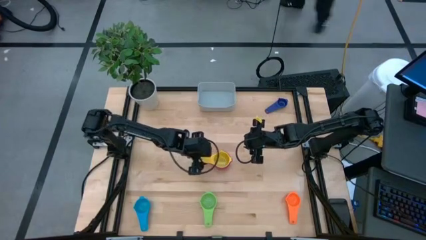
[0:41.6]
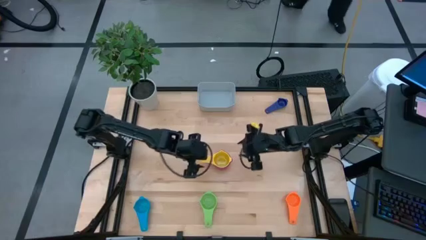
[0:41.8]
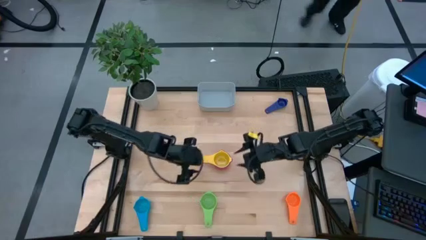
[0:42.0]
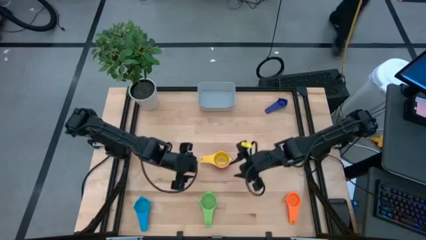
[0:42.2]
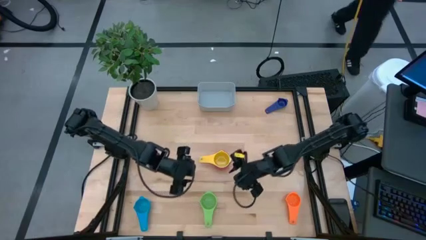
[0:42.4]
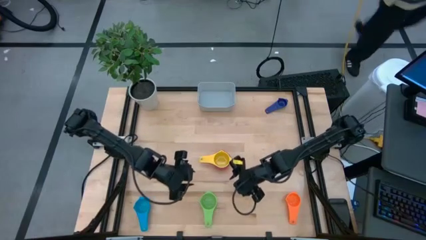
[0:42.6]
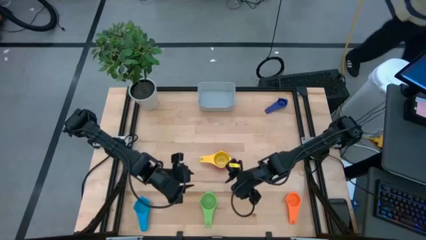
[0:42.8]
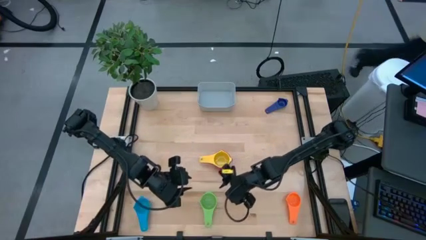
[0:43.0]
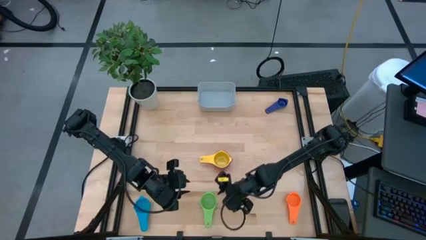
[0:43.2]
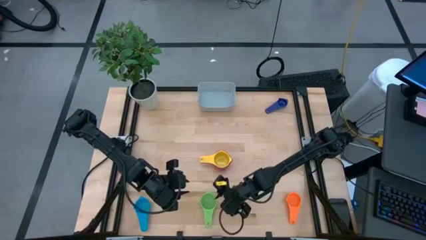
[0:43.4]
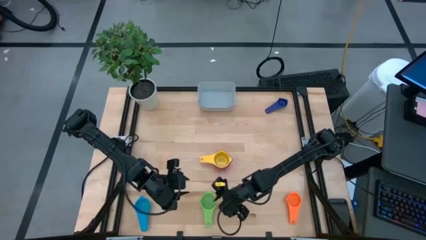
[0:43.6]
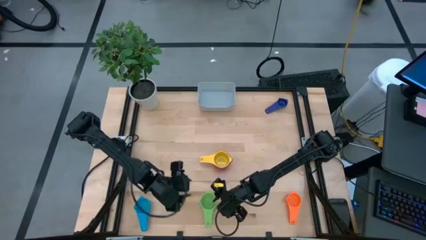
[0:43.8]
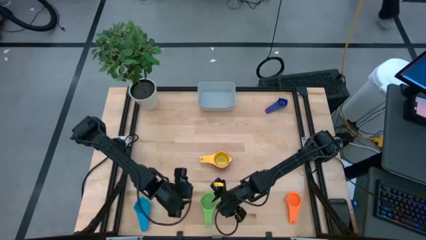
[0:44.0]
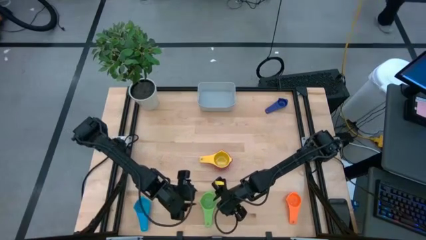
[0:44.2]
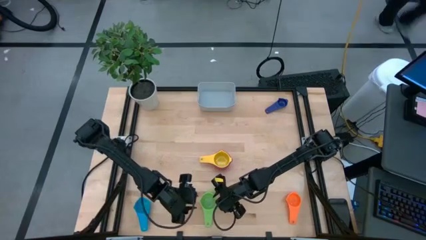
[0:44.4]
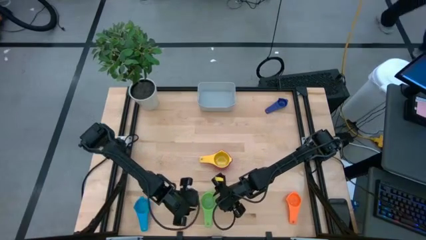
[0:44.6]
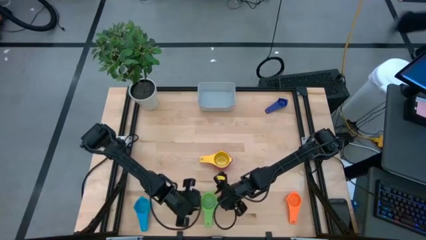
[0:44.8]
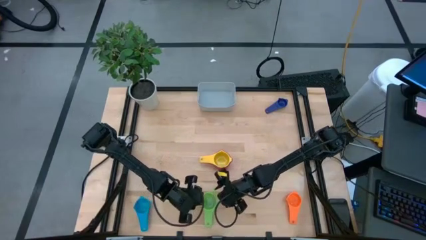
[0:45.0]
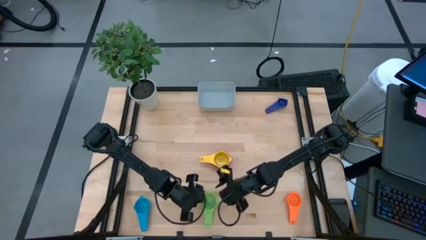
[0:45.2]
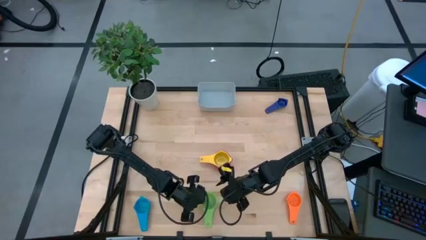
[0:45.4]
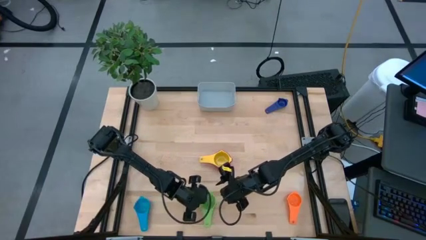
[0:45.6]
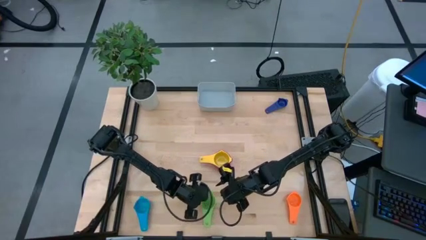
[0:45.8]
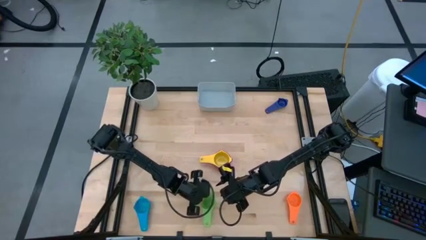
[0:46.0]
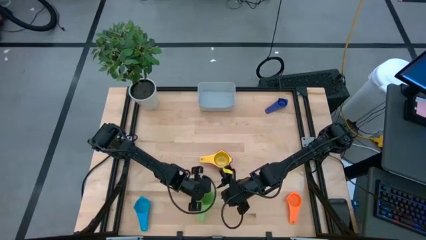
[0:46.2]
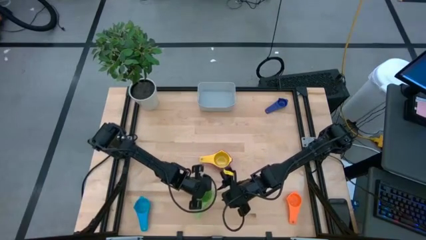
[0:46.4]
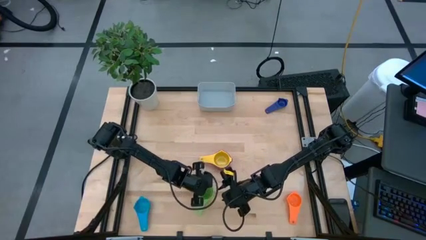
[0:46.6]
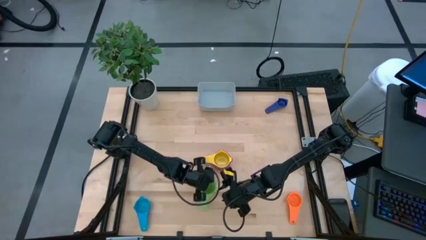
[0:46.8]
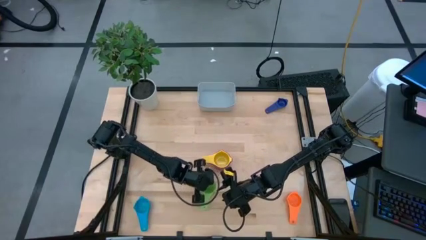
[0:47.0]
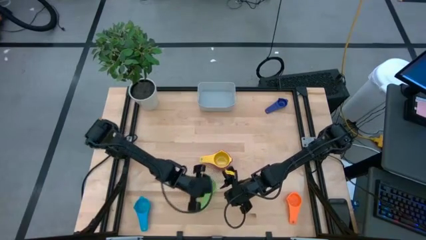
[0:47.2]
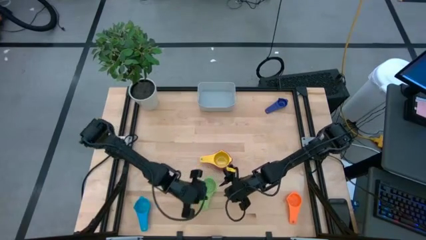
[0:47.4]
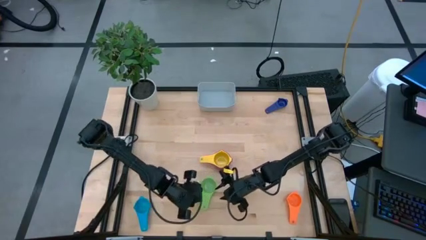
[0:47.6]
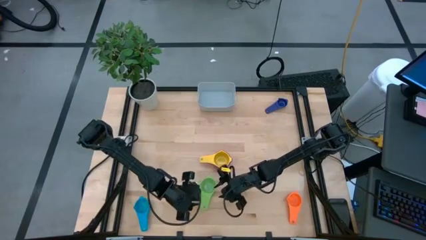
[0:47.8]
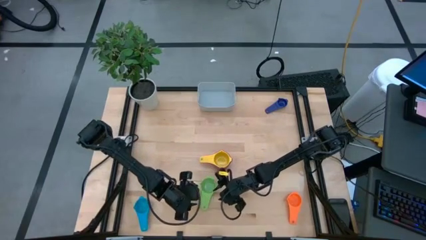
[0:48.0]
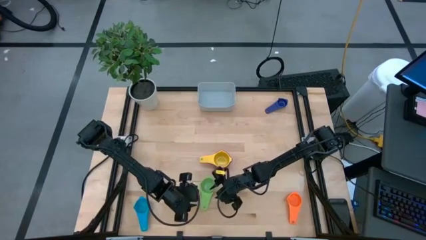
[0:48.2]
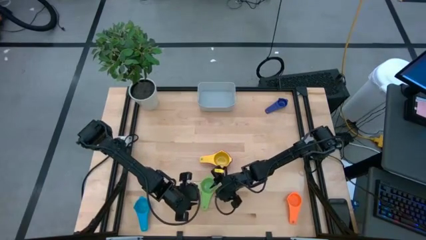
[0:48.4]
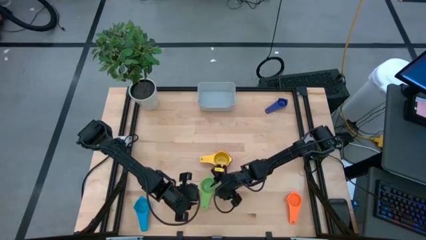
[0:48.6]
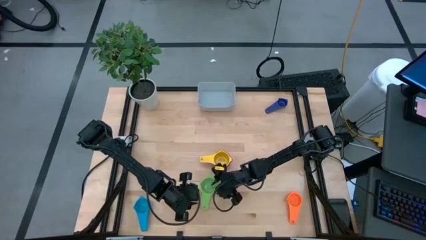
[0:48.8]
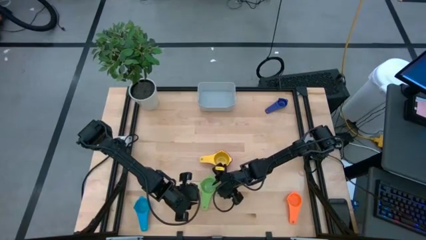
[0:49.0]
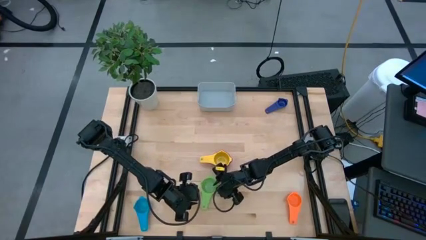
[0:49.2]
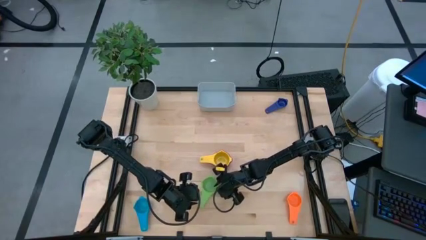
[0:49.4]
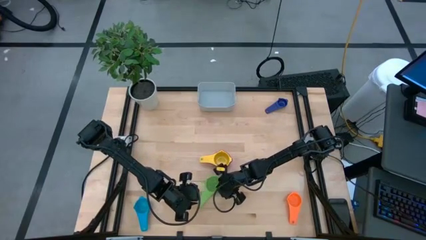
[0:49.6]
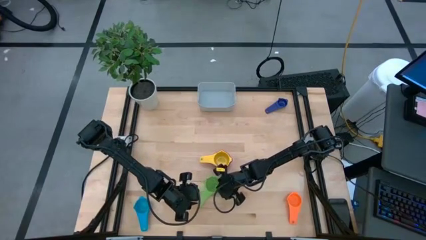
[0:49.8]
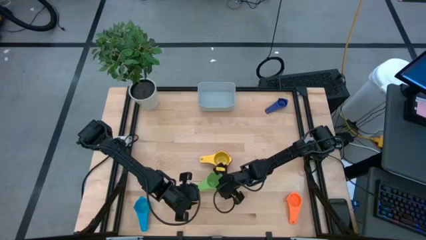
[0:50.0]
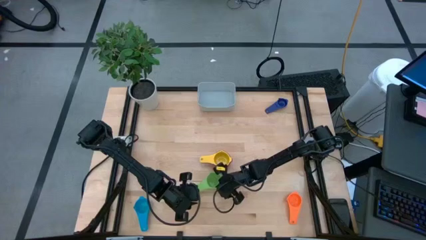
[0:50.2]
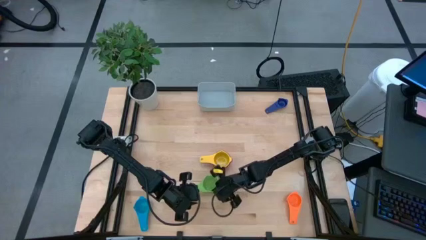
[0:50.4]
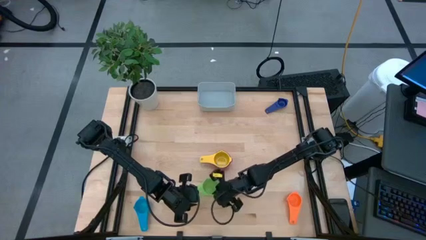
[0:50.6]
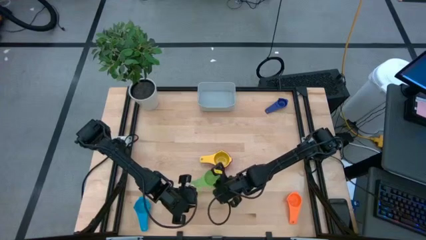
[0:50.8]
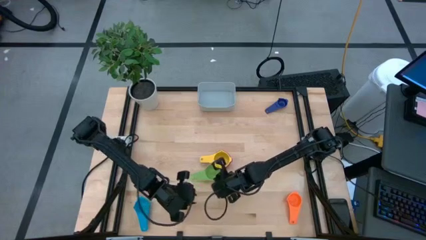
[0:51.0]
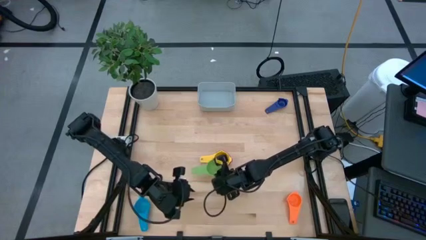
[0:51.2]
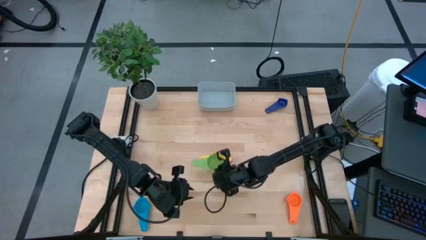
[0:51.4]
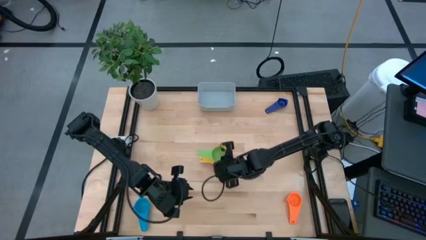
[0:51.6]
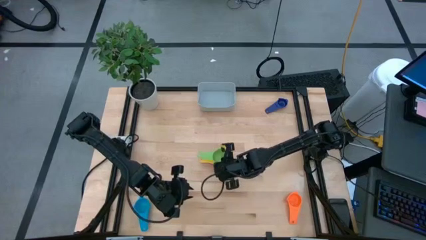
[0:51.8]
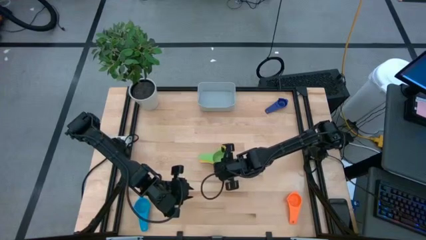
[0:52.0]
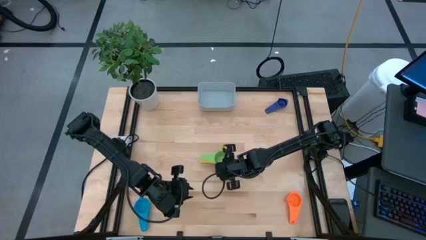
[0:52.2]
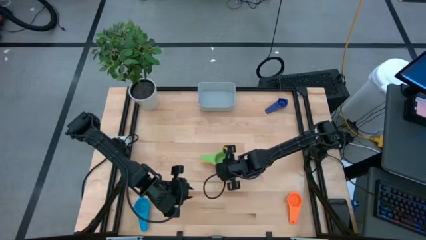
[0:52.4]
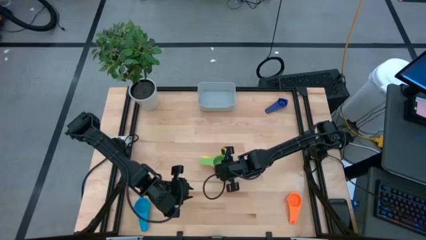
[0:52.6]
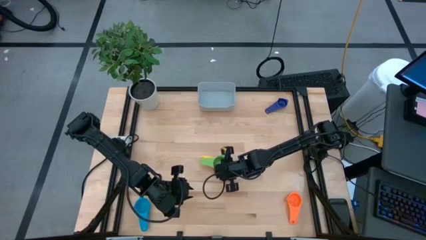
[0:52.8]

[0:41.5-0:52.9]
Task: Nest measuring cups in basket
Stack the green measuring cup on top of the yellow measuring cup

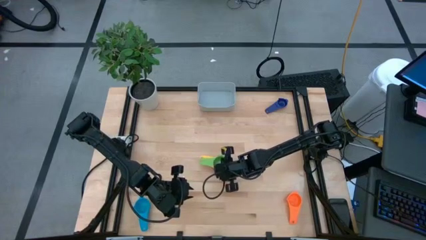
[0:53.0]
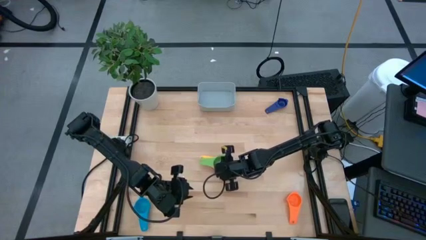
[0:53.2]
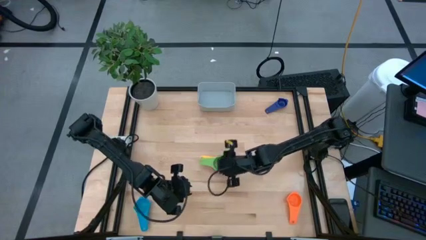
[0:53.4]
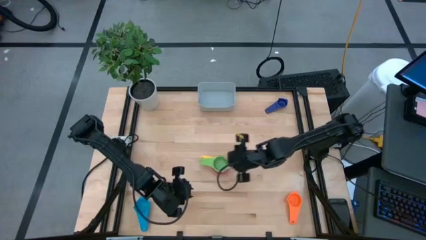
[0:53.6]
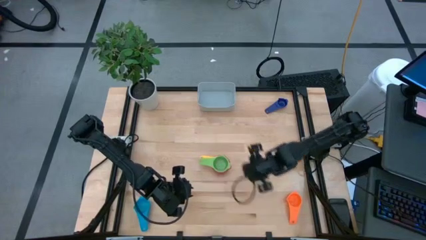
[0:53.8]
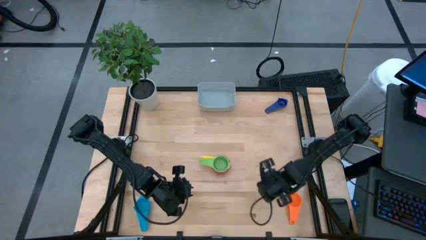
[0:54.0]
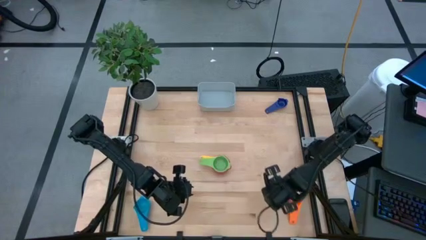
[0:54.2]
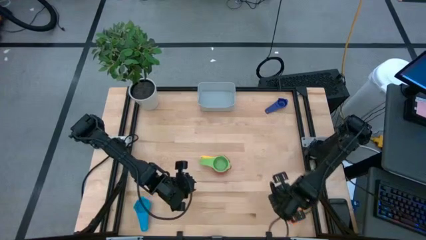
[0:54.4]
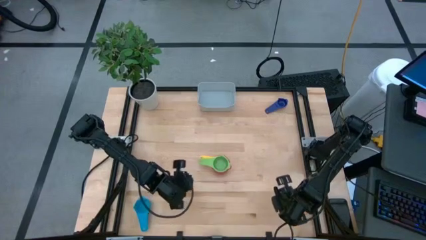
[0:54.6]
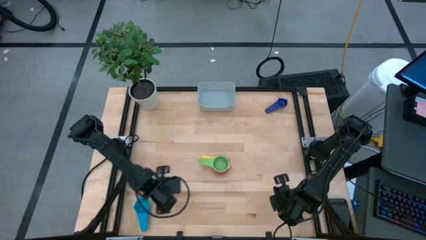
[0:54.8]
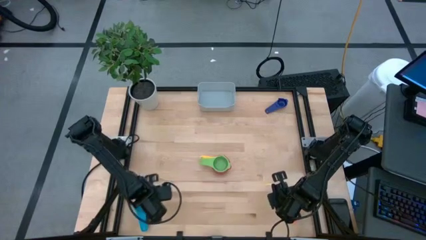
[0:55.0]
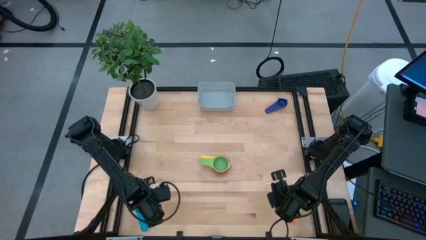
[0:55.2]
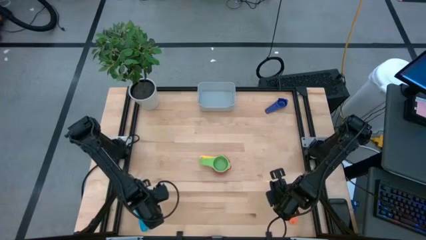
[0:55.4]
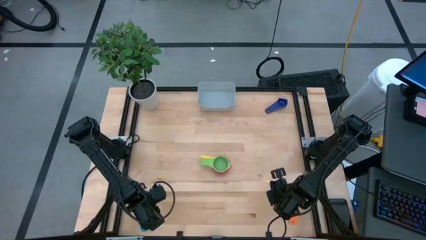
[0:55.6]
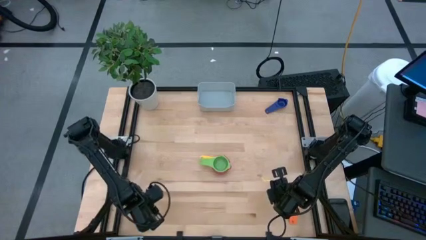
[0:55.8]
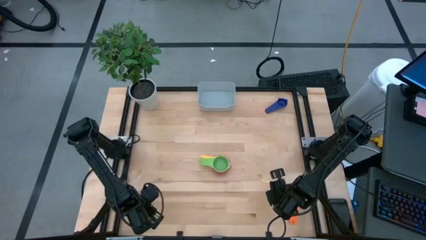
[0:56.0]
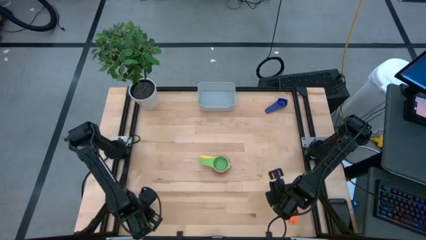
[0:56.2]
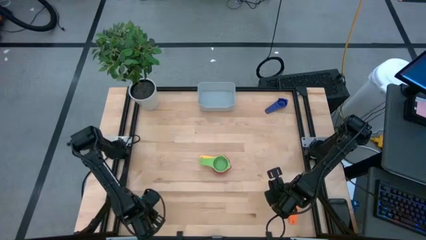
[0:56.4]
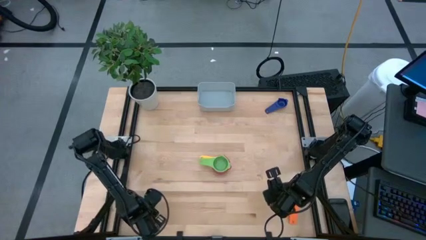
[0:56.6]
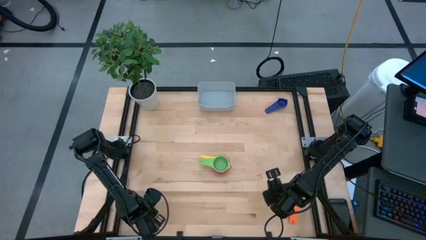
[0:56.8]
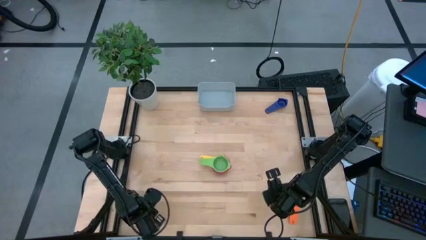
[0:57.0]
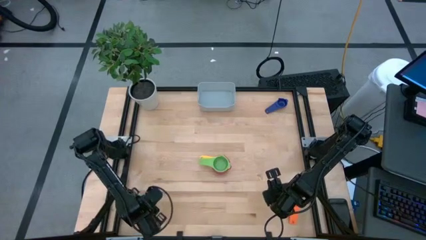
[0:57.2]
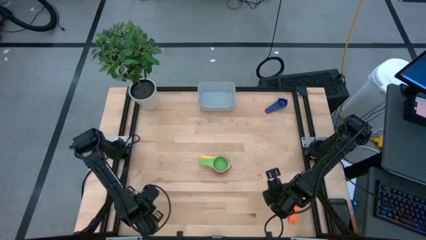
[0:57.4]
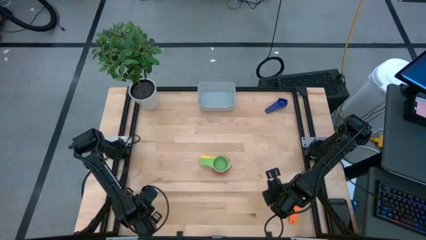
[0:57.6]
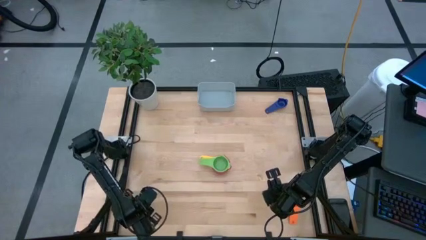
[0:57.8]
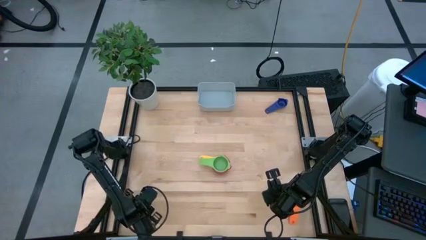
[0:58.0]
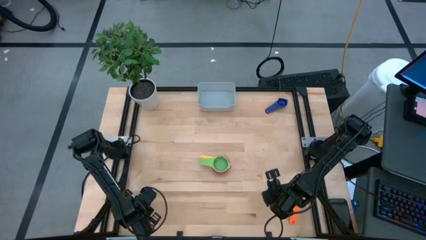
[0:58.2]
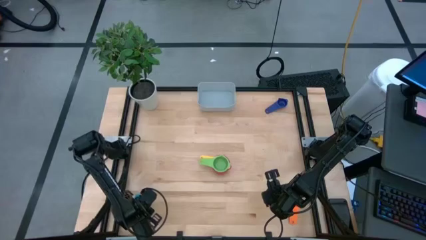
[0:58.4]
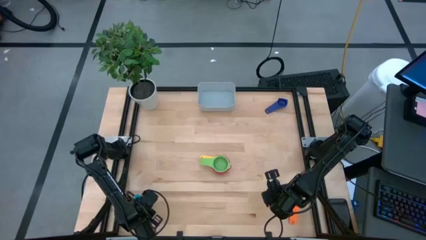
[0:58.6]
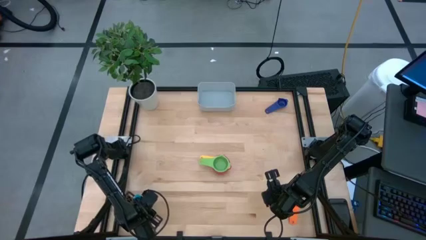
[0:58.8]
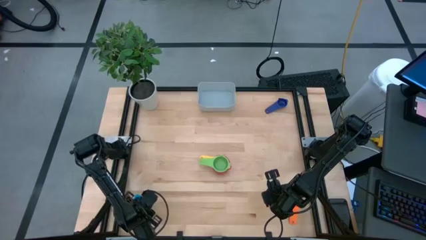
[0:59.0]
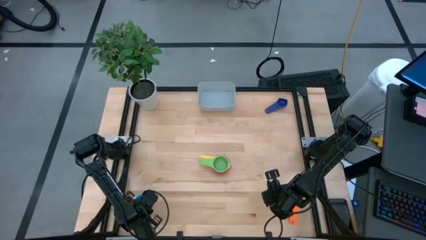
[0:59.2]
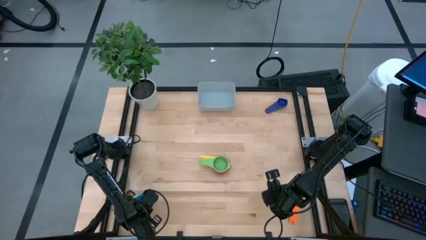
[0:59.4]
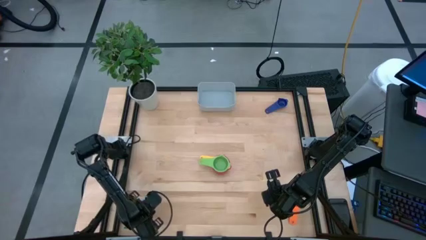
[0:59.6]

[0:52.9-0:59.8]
Stack the light blue measuring cup on top of the green measuring cup
